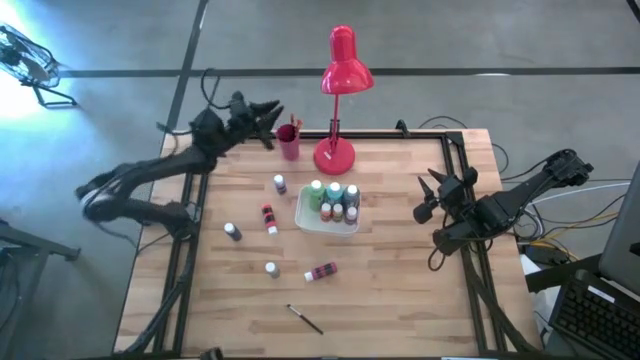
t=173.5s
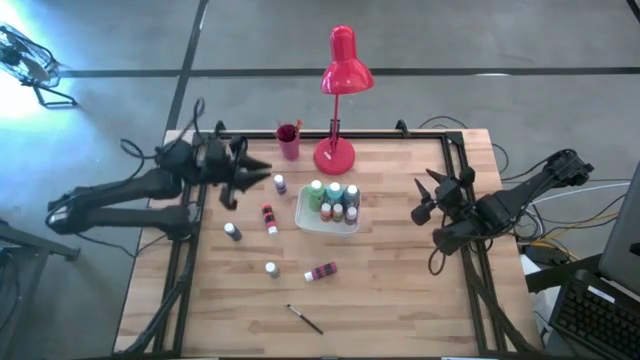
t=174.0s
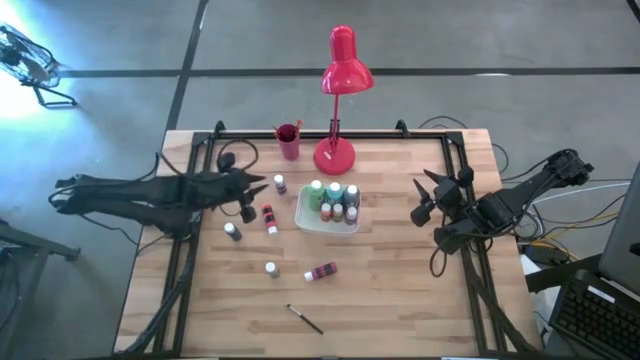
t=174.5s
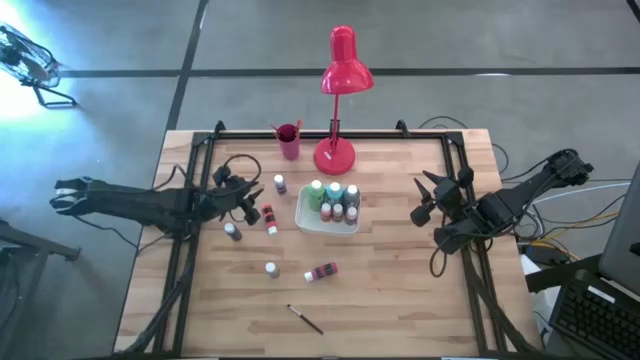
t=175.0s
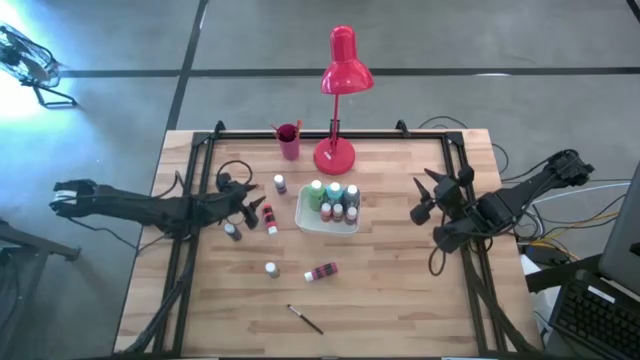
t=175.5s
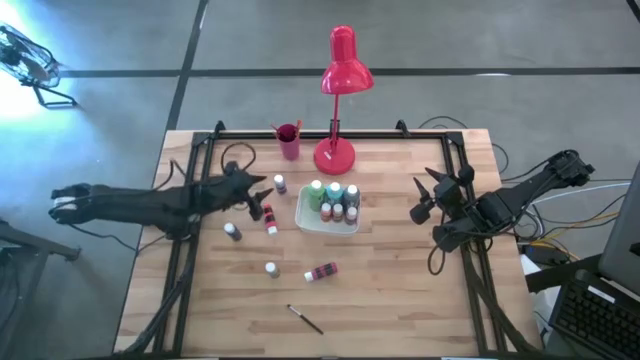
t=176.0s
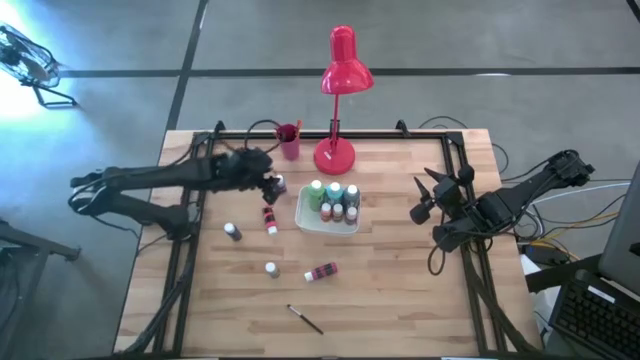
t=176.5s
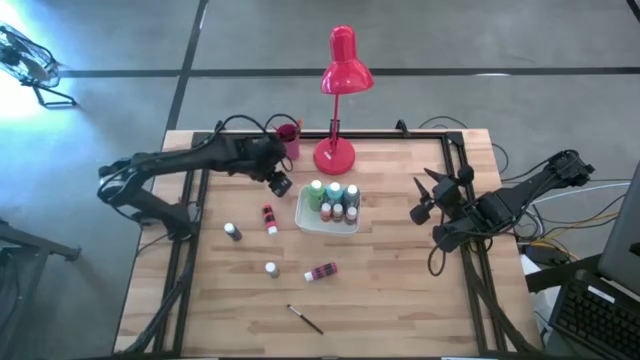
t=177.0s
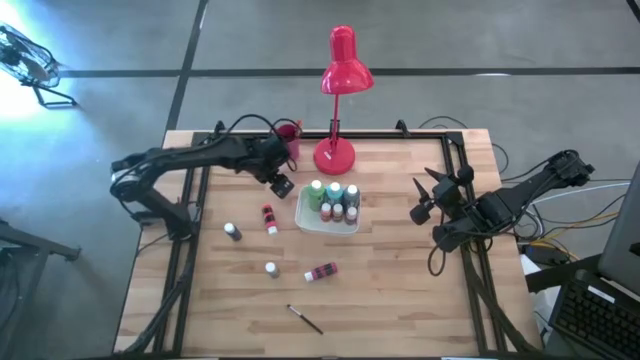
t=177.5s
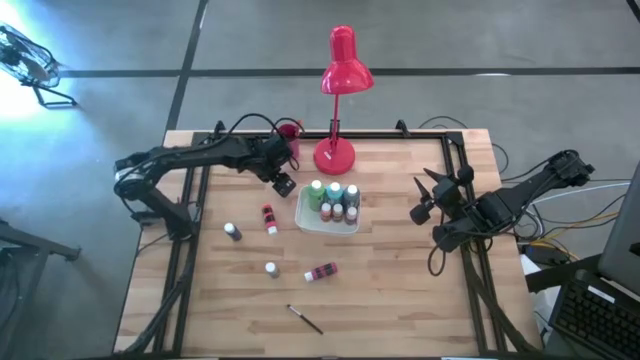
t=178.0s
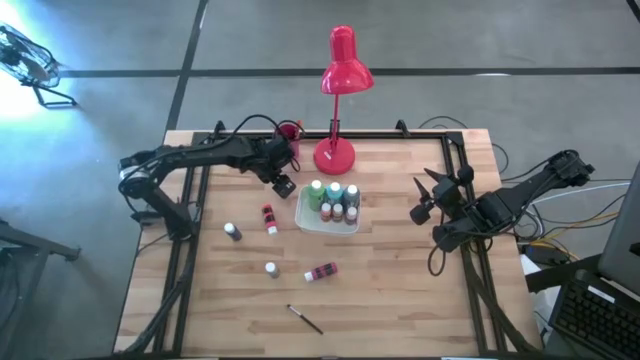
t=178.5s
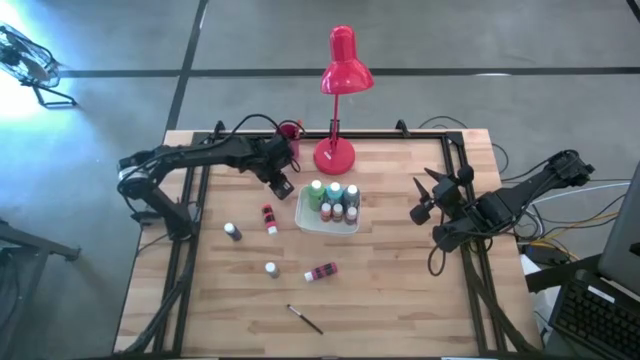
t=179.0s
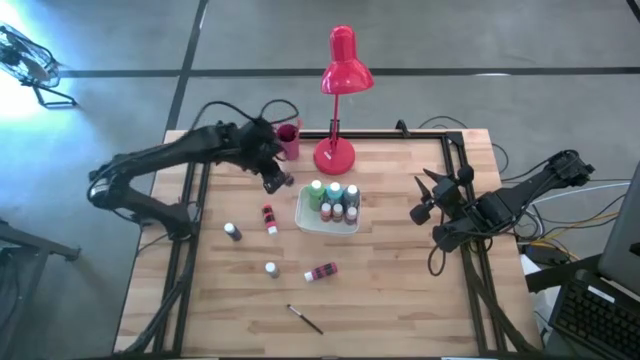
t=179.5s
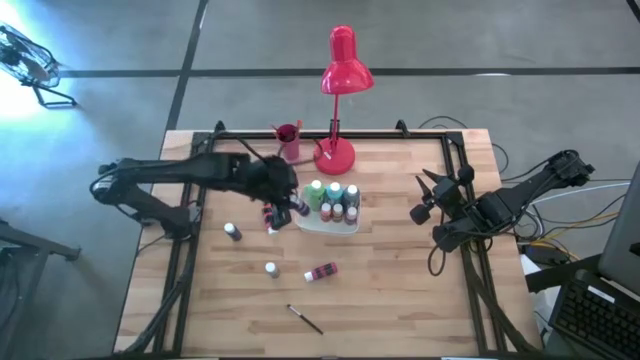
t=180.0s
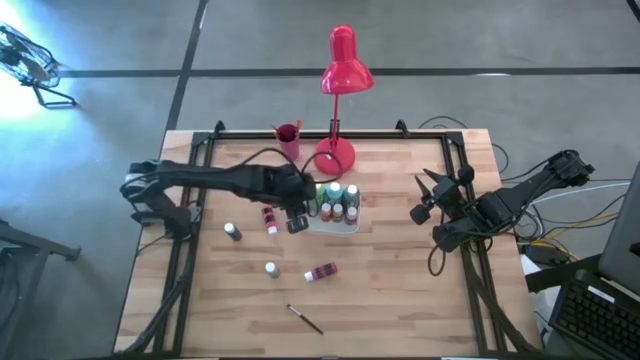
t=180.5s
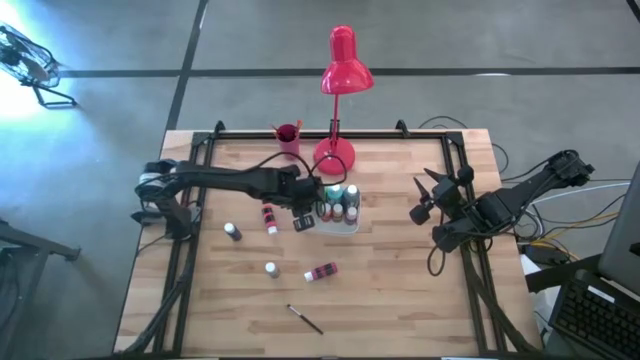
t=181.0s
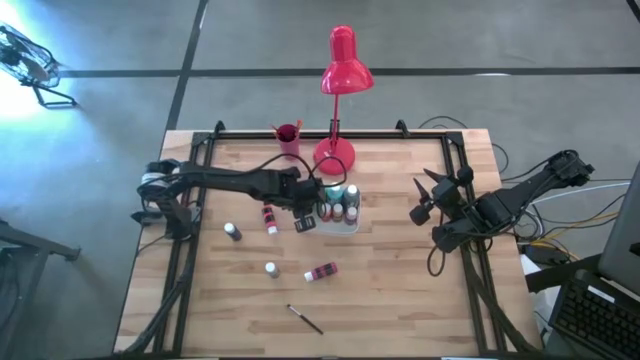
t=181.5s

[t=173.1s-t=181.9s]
Task: Pick & Place Paint Supplies
Put the violet paint bottle into the white bin

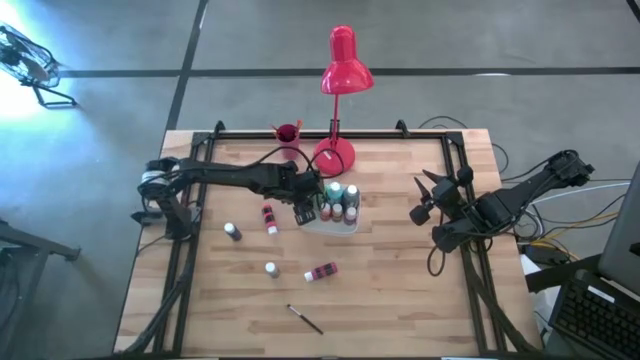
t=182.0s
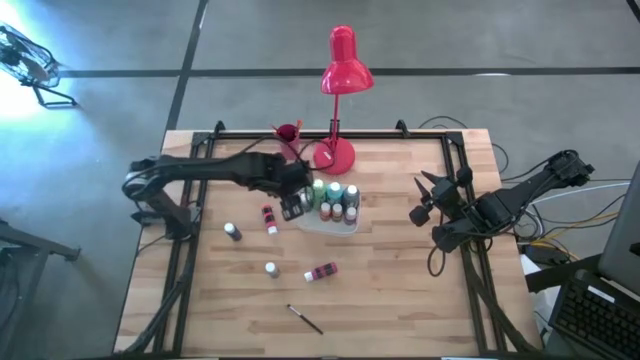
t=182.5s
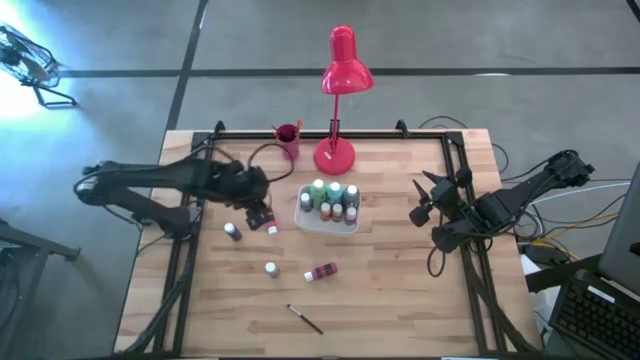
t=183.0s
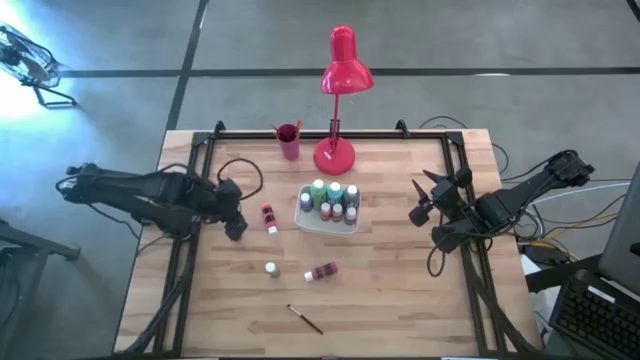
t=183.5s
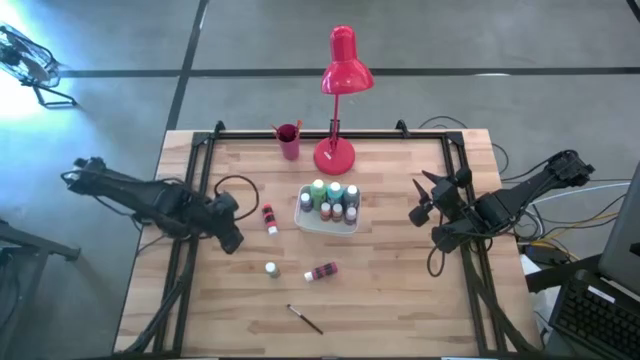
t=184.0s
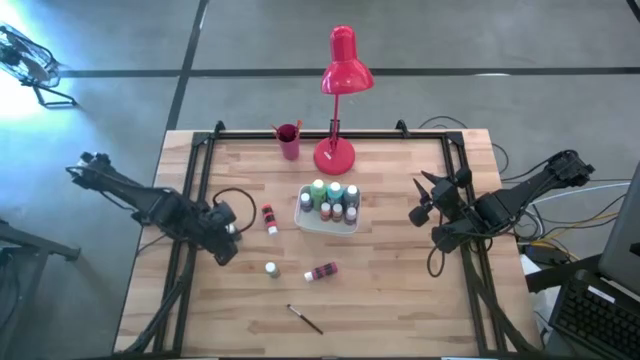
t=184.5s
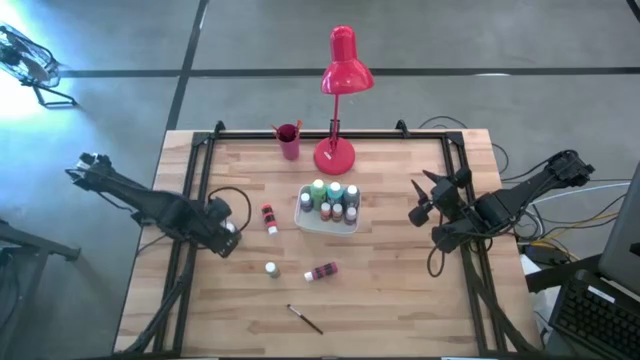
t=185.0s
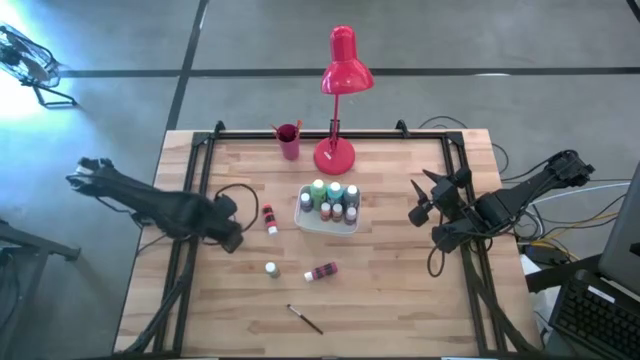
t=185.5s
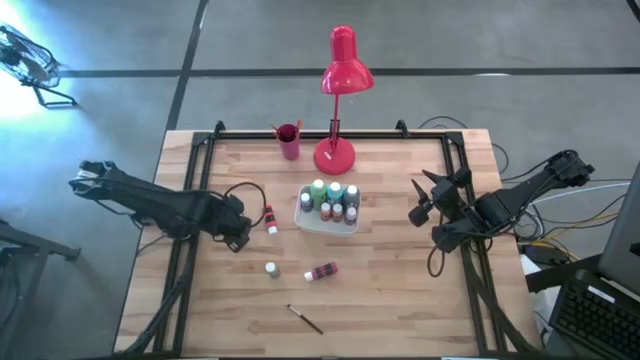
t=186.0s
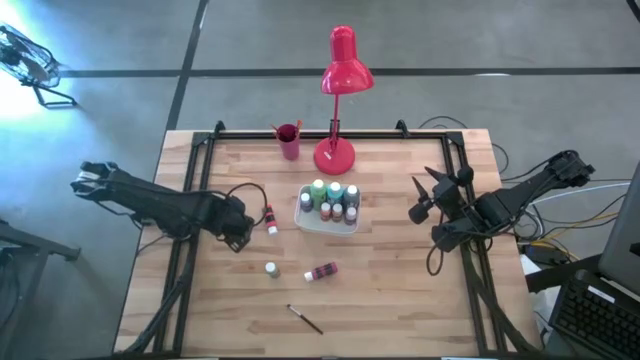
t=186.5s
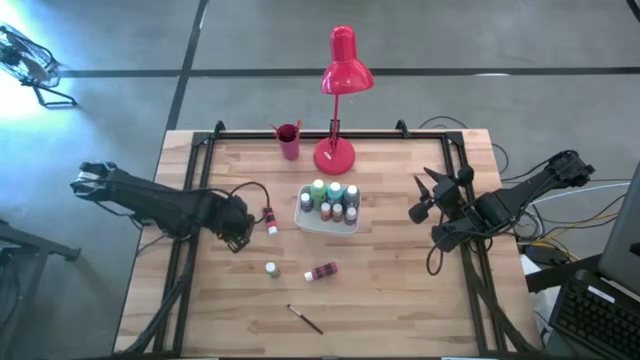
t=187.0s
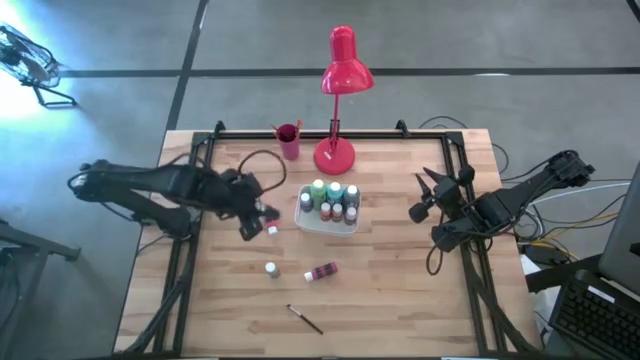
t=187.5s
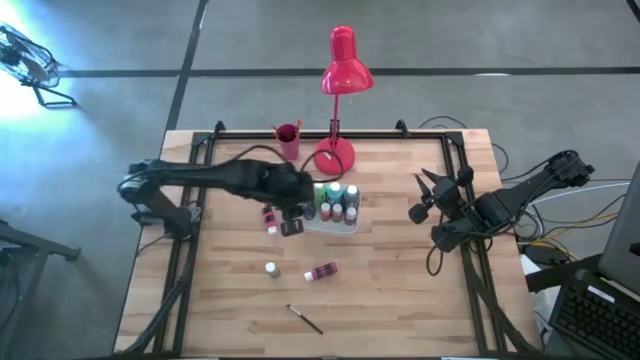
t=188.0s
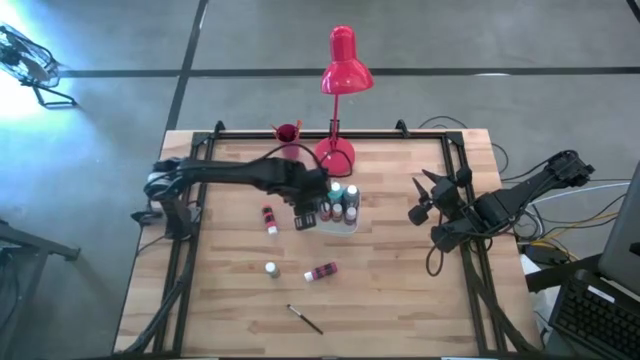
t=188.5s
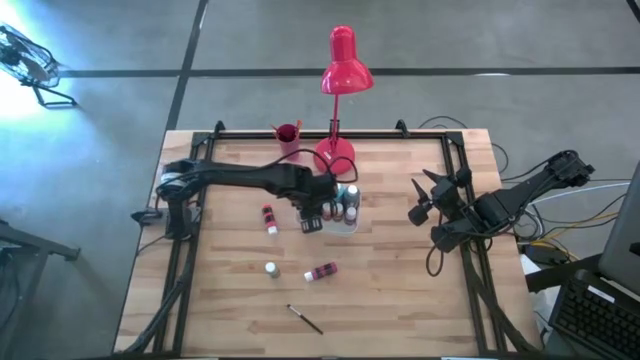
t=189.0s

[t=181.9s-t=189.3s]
Put the blue paint bottle into the white bin

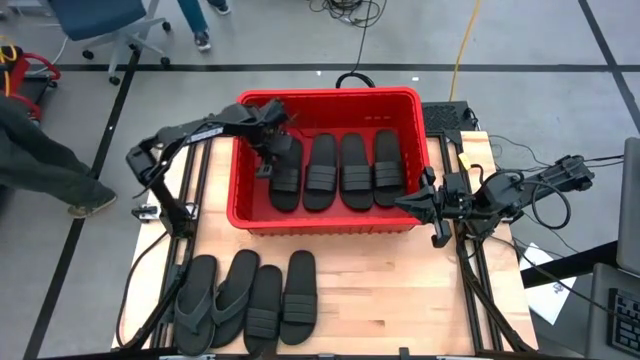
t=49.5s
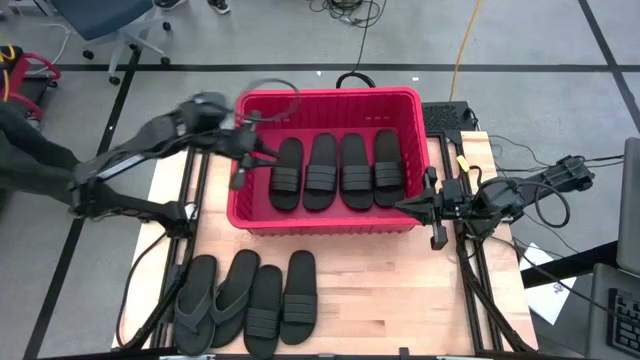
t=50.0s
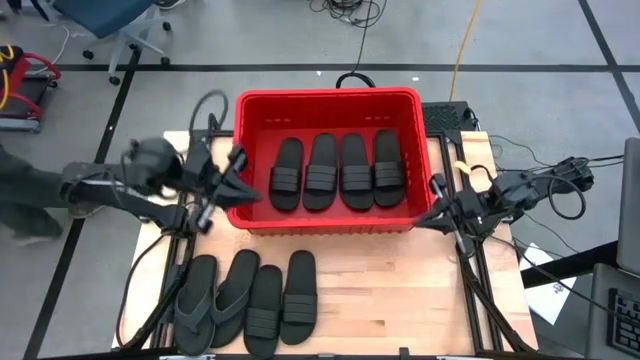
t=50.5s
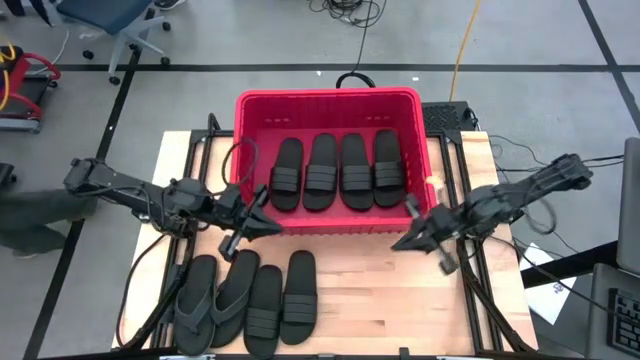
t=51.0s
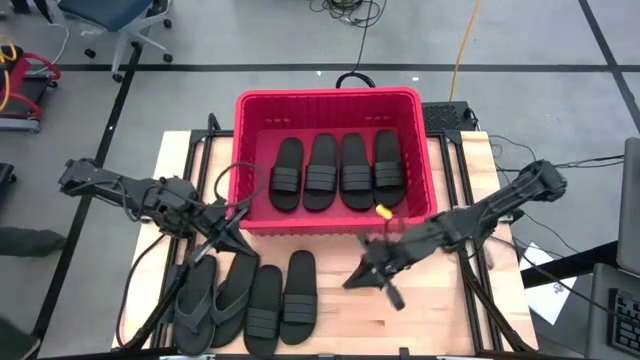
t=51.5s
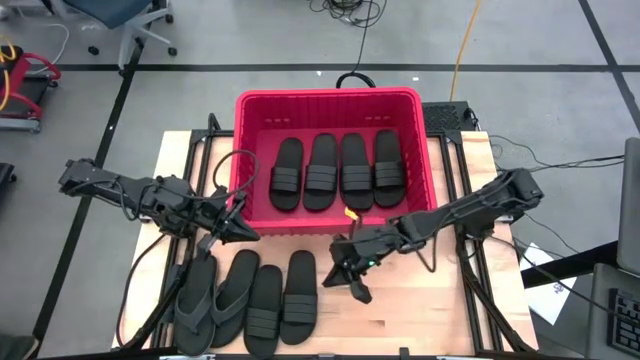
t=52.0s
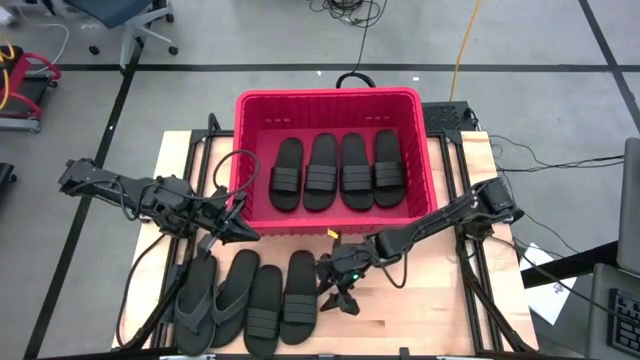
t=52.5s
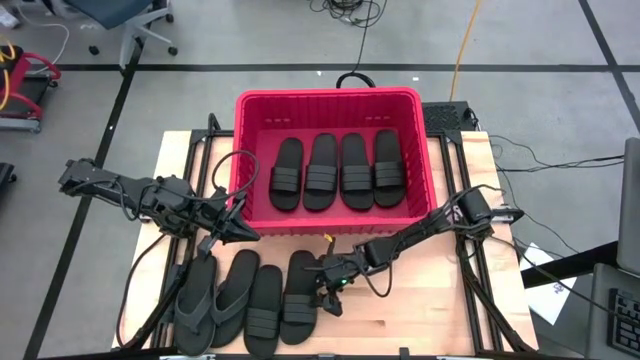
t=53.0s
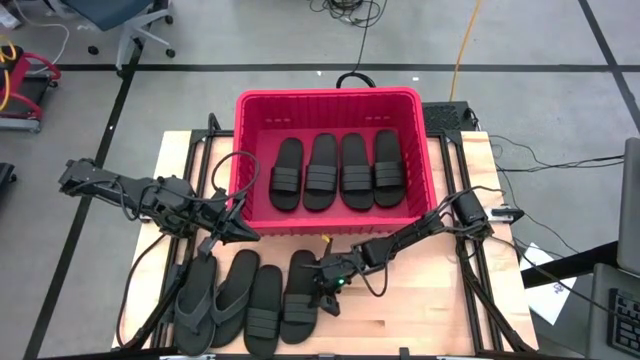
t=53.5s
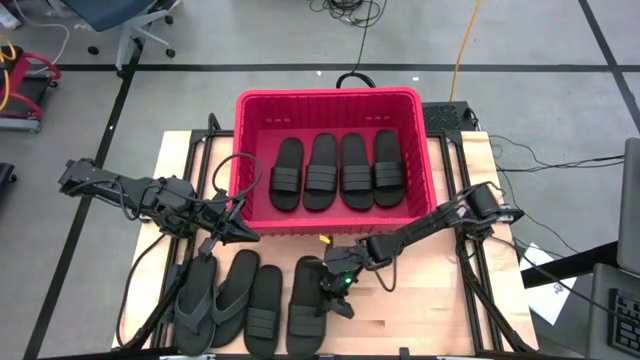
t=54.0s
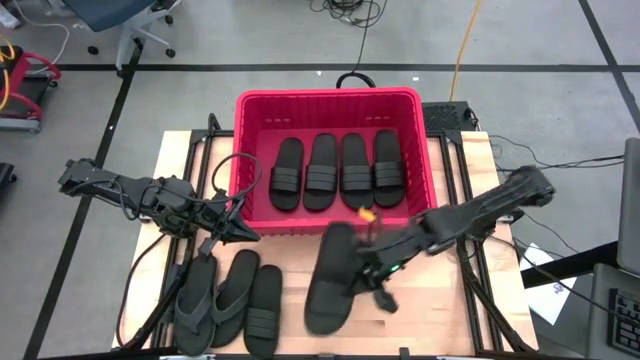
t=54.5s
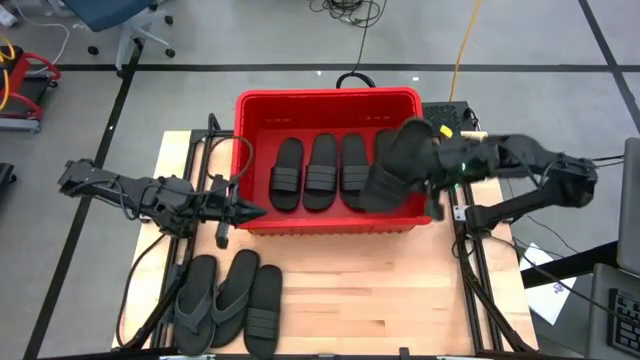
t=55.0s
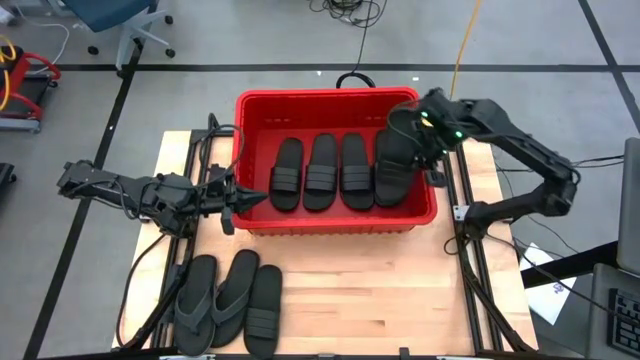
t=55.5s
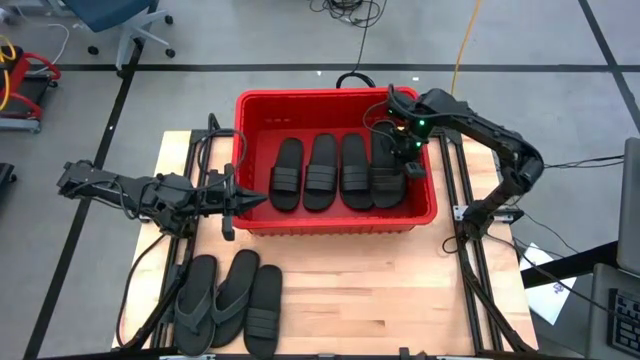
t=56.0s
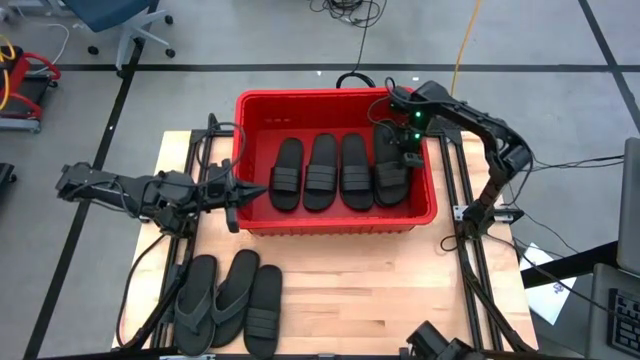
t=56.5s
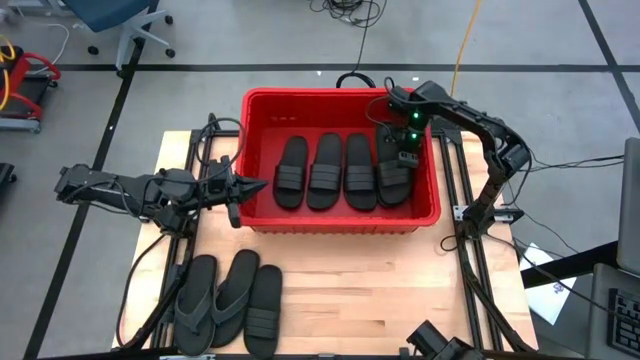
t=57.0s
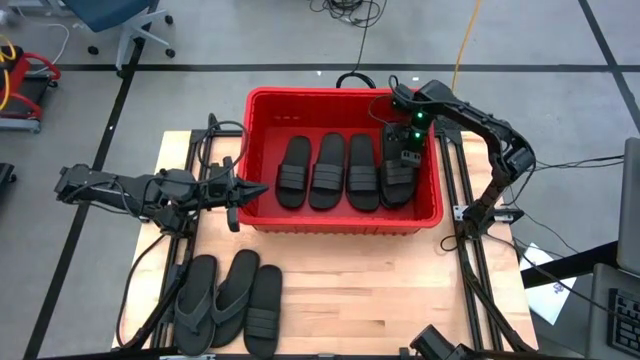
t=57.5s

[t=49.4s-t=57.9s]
Task: Pick and place slides into bin
Put the black slide into the red bin
